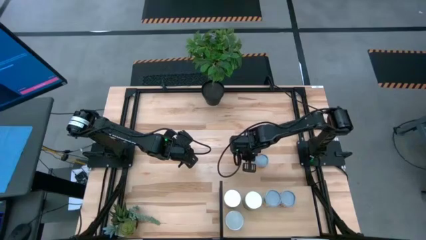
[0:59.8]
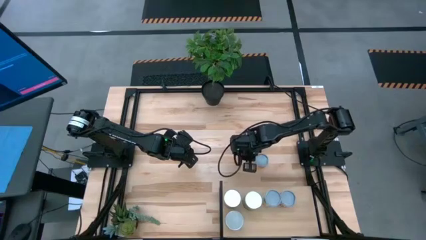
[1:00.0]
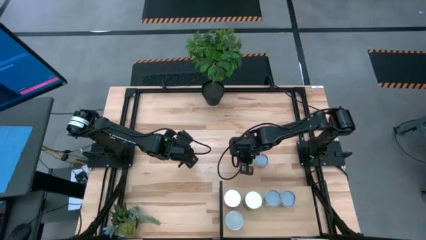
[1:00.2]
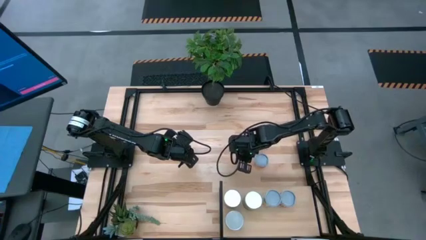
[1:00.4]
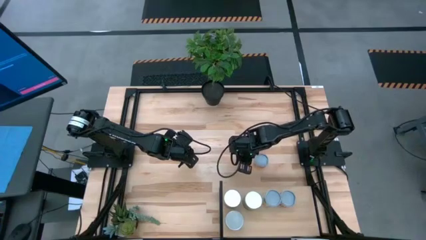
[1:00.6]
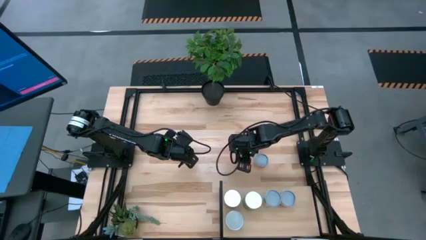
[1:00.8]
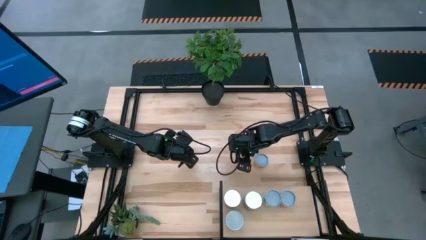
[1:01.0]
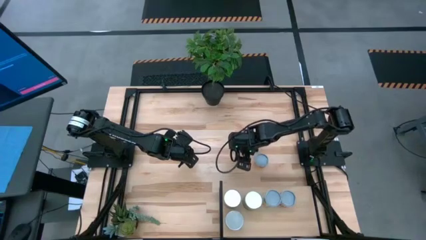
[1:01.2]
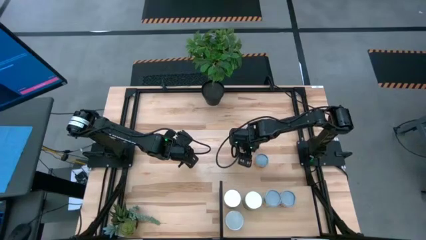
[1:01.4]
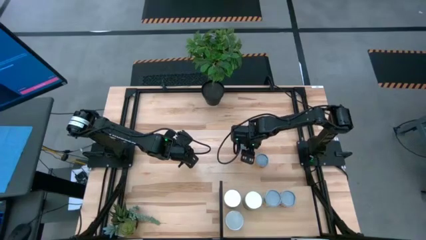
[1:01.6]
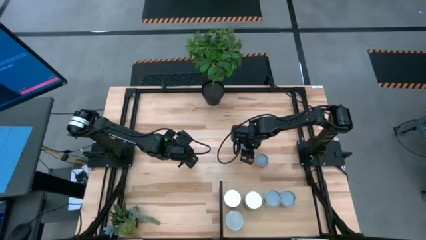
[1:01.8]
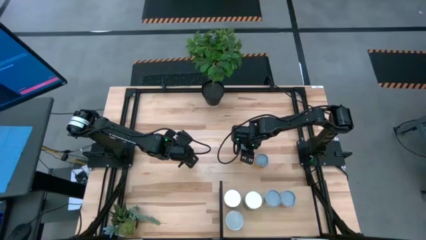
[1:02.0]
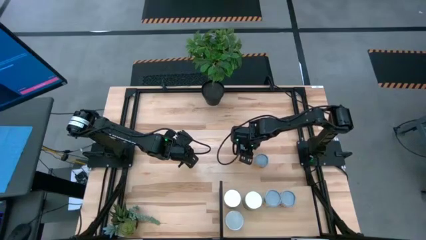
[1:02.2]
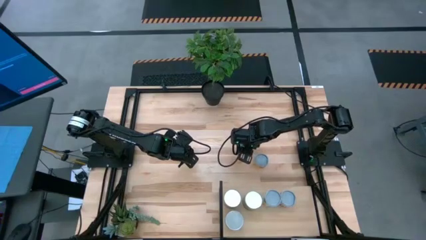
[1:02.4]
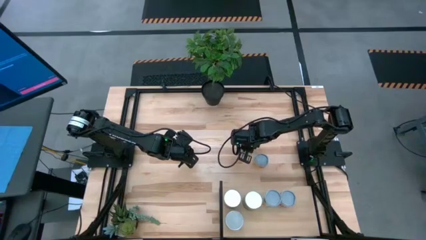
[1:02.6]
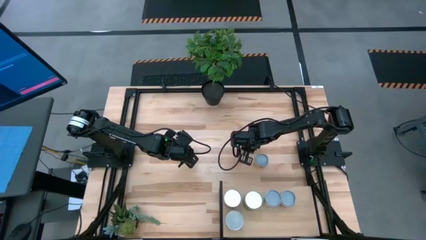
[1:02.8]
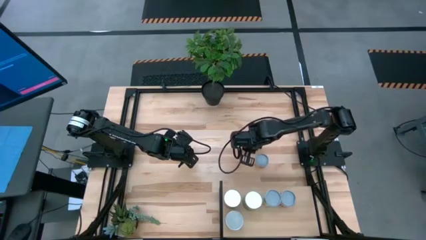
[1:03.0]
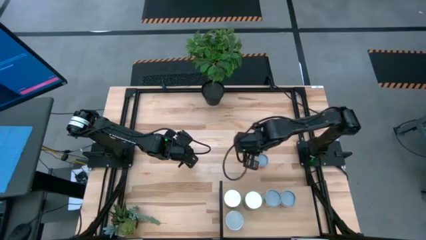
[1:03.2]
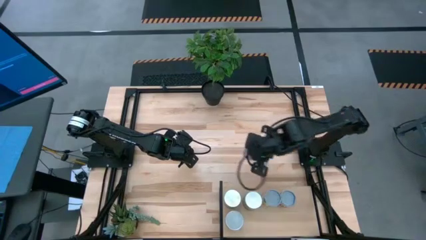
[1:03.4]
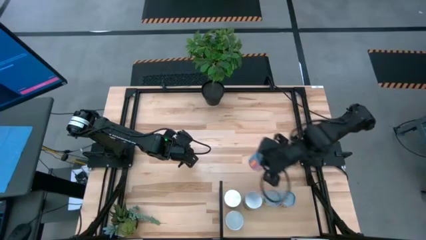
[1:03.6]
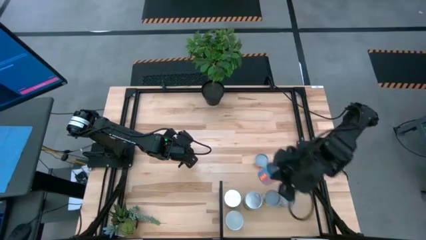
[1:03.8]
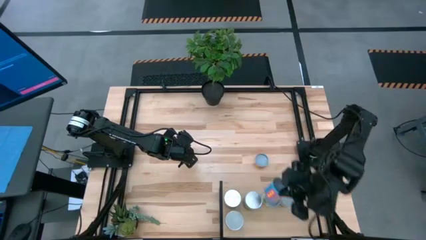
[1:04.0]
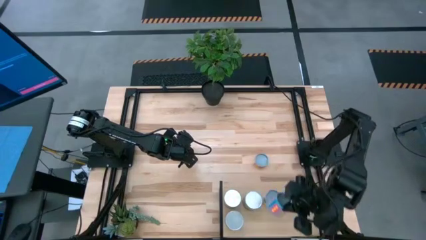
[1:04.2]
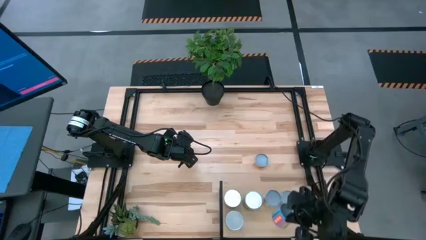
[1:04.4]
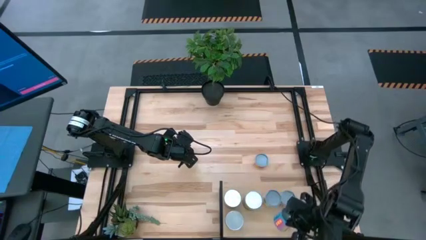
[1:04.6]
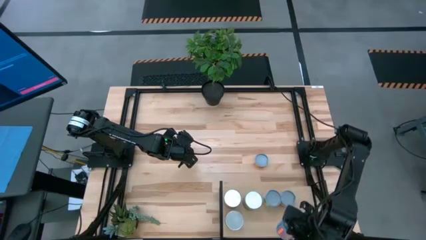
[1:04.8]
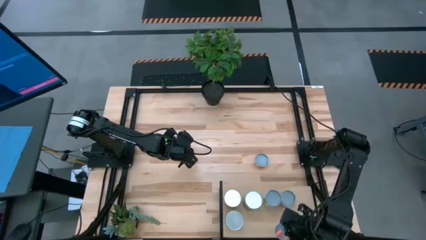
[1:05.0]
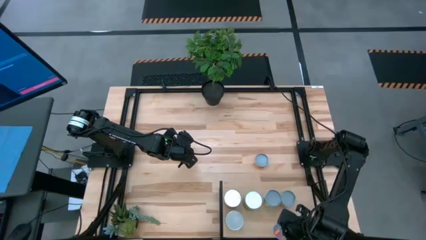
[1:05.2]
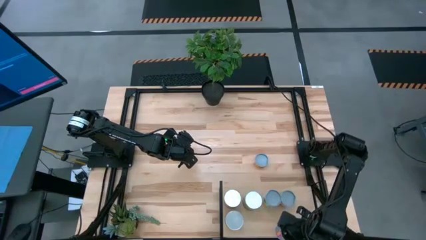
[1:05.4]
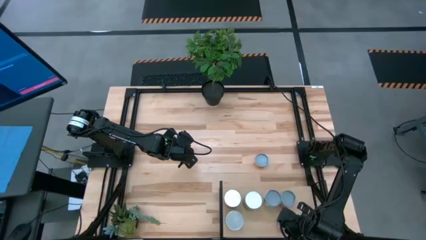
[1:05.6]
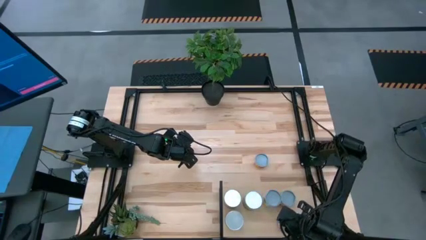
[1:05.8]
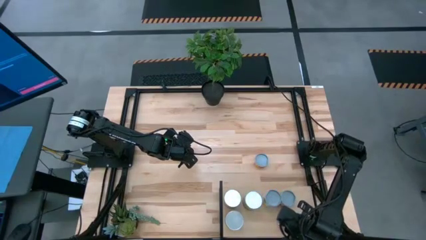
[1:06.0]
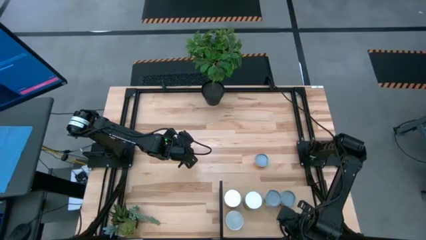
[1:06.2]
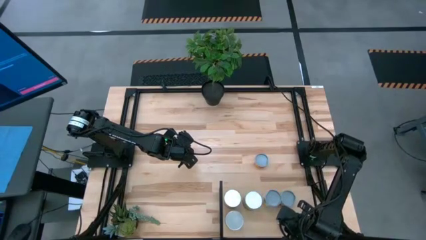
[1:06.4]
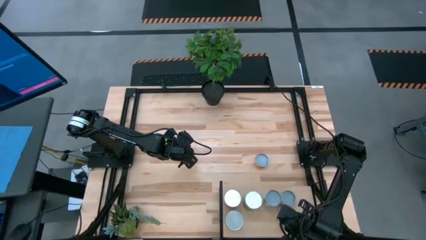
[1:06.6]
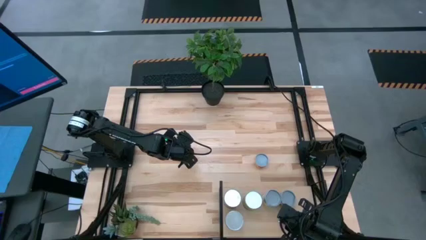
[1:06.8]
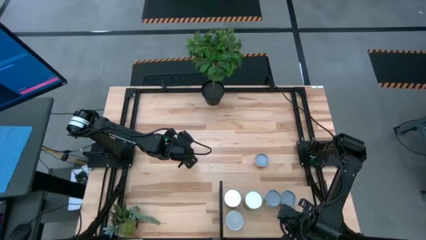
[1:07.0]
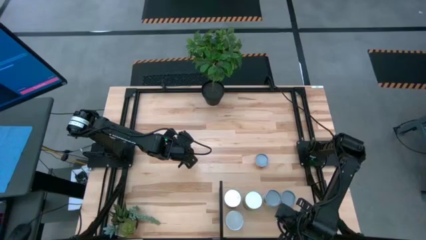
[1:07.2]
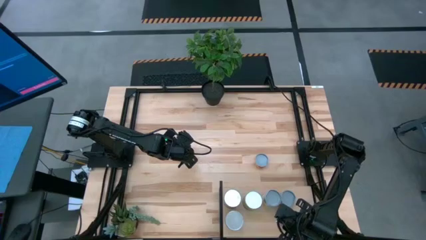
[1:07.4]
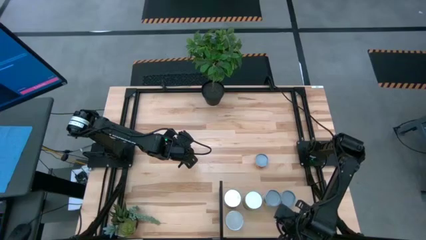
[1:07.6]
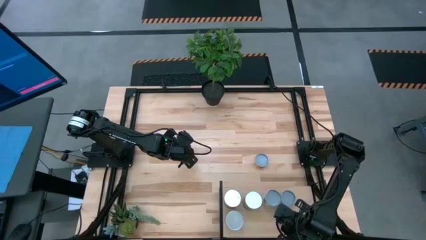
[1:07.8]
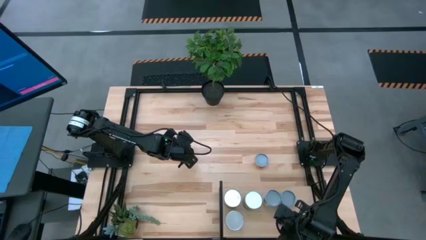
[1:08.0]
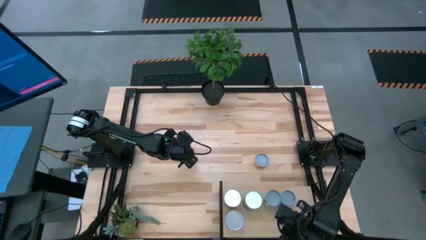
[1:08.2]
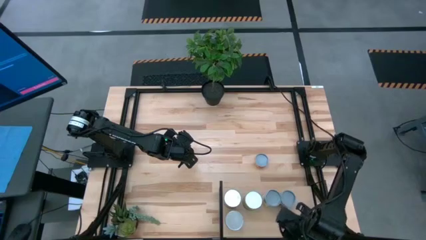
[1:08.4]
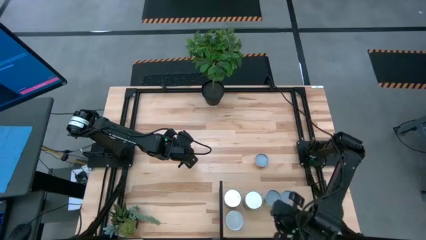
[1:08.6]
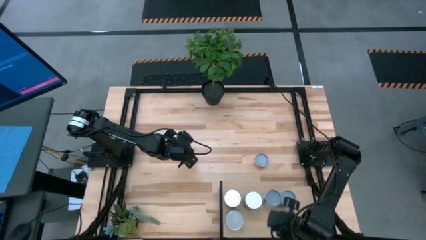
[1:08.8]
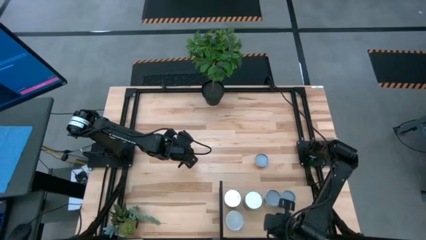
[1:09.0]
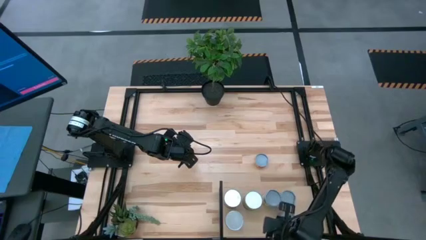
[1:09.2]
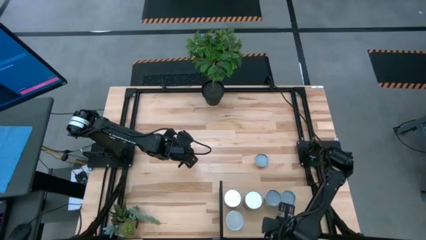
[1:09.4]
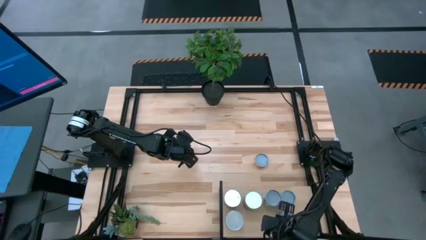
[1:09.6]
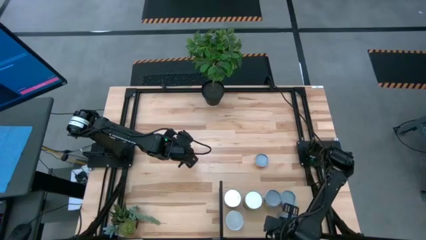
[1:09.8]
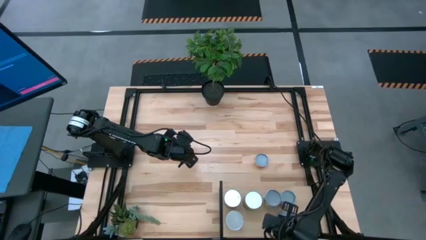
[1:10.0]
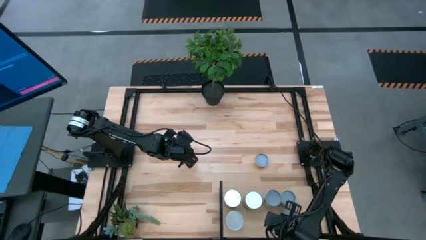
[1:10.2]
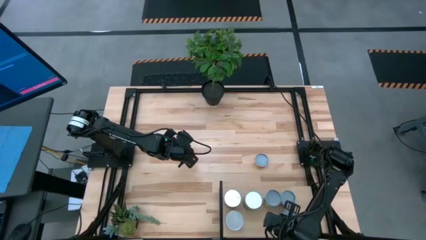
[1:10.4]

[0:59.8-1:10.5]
Task: Pick and place cans onto a shelf
Put the canned corn on the shelf

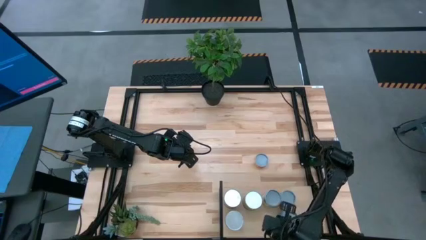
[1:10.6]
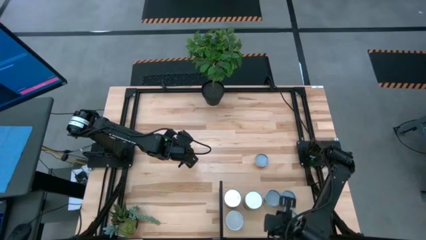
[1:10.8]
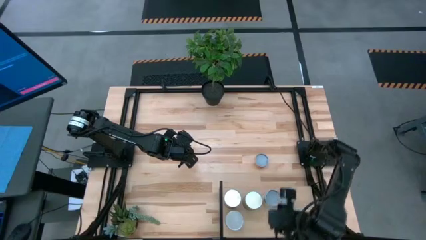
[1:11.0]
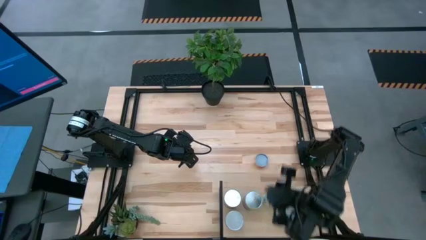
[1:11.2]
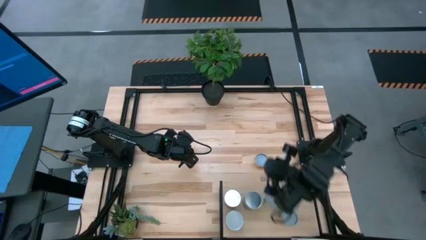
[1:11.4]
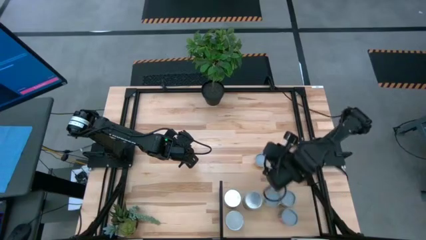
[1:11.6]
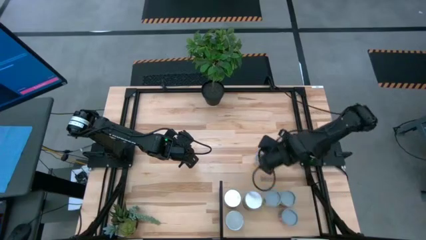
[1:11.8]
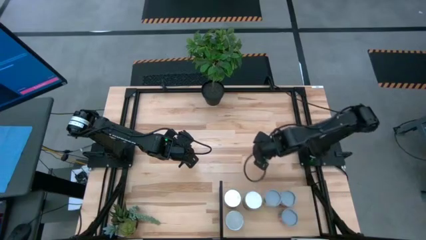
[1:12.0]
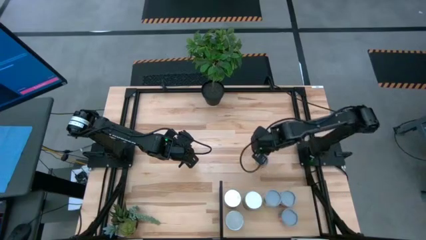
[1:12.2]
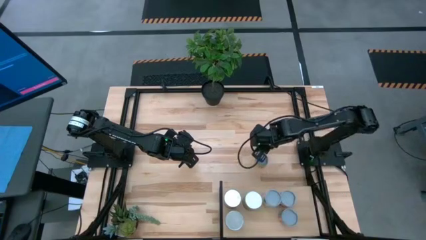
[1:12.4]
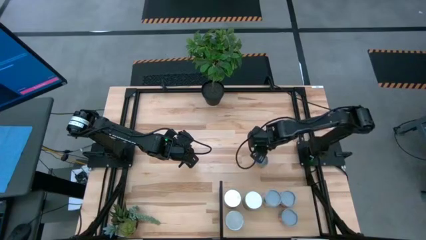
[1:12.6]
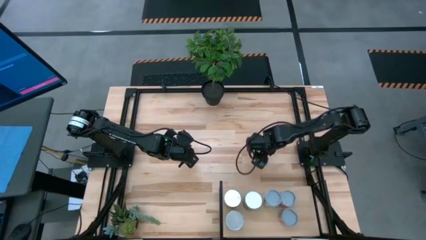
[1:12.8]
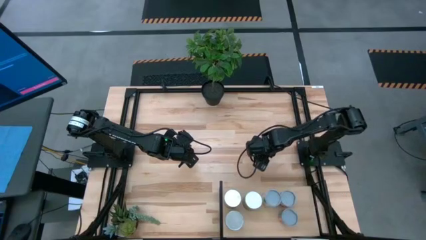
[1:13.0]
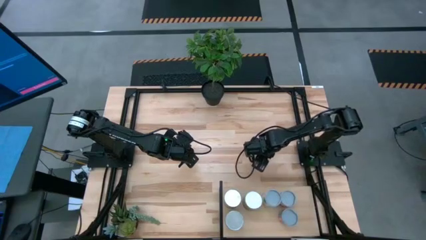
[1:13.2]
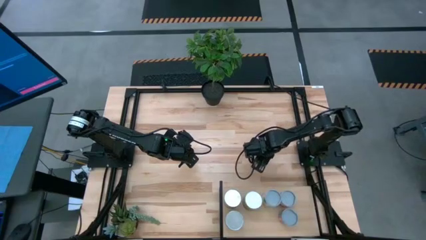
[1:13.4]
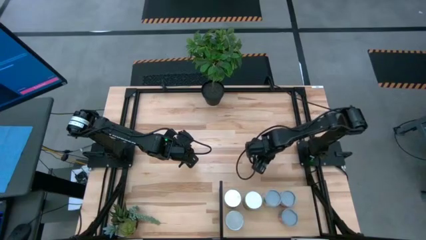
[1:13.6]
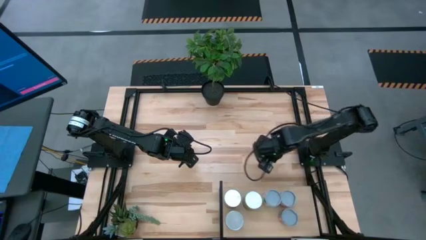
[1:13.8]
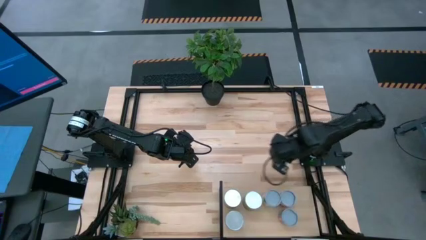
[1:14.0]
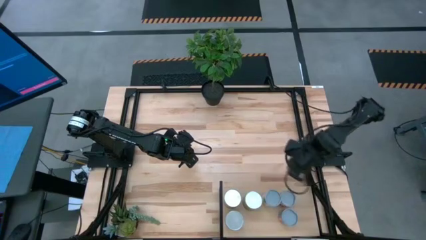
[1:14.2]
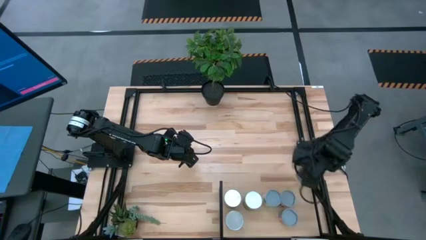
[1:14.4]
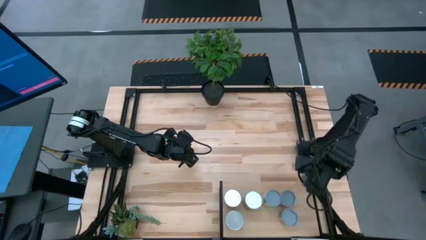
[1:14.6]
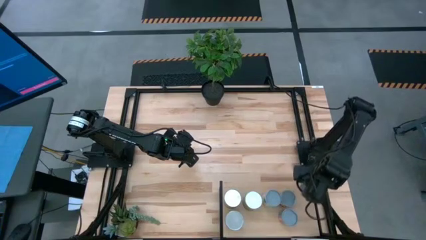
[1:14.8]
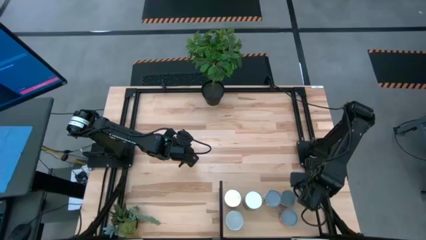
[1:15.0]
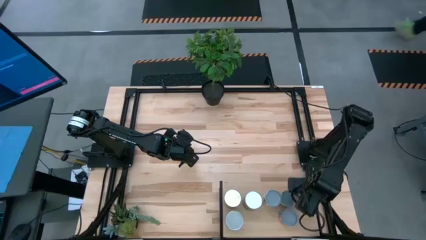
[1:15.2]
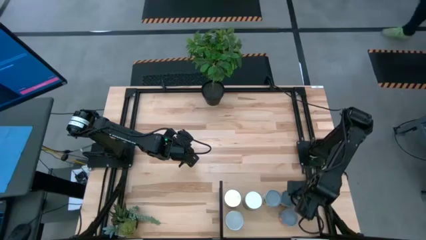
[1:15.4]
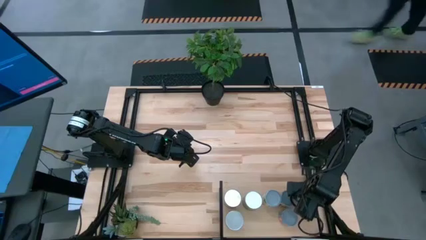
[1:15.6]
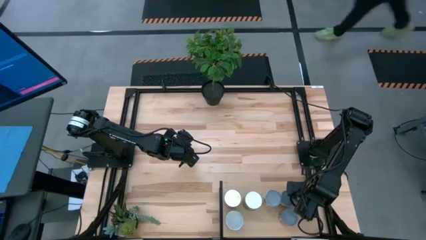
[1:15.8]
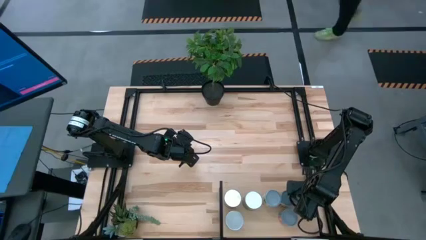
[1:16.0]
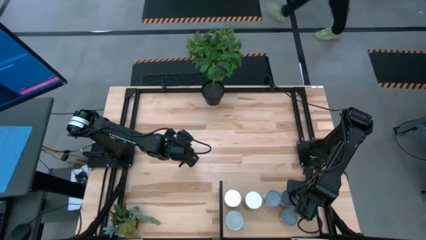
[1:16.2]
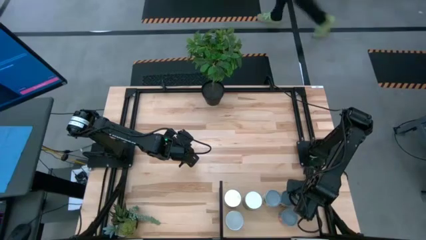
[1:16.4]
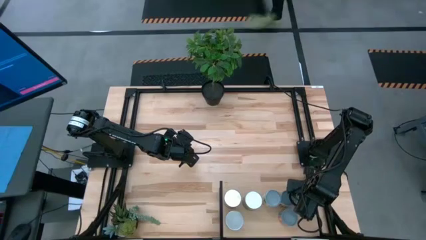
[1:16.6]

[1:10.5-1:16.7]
Put the canned pineapple on the shelf
